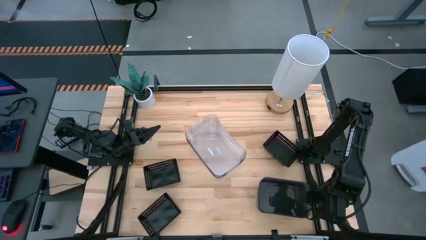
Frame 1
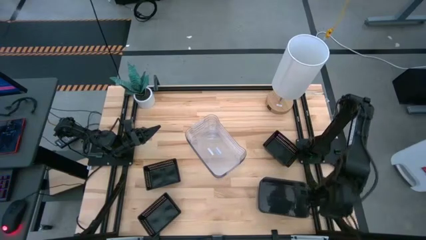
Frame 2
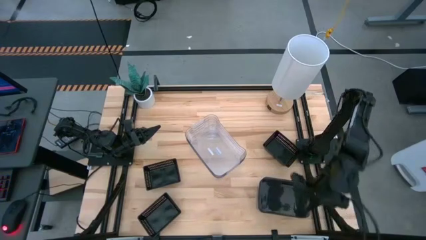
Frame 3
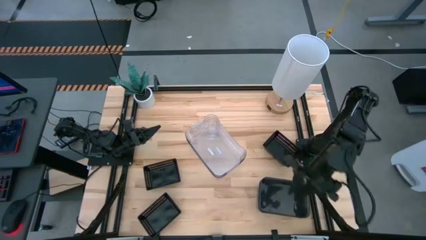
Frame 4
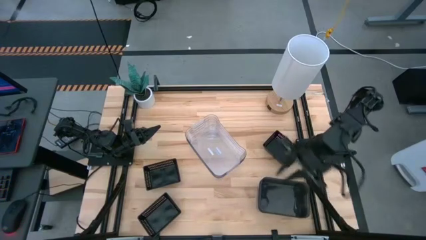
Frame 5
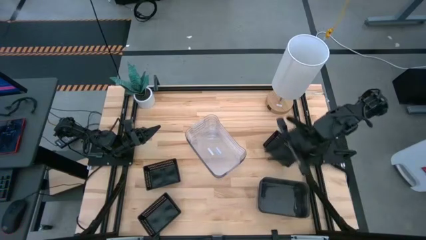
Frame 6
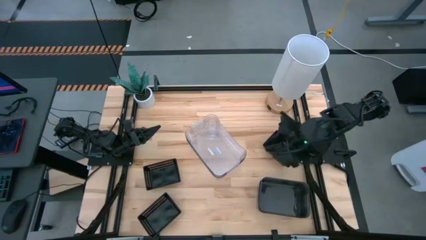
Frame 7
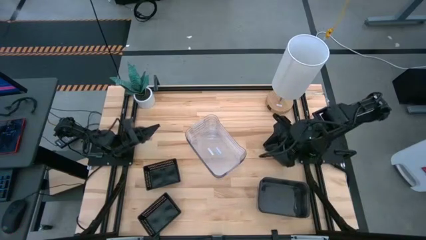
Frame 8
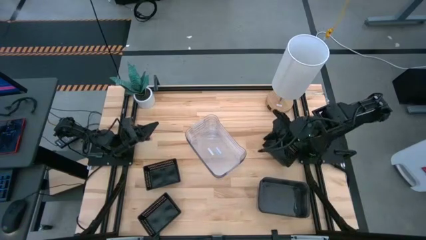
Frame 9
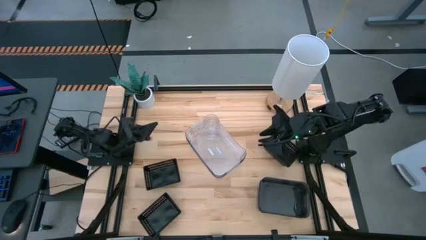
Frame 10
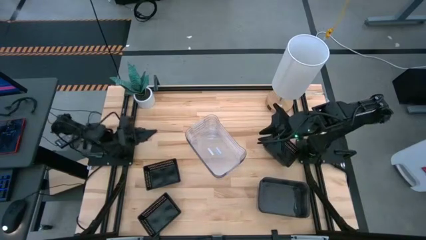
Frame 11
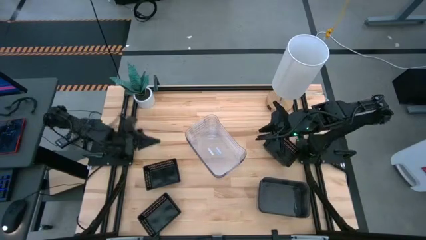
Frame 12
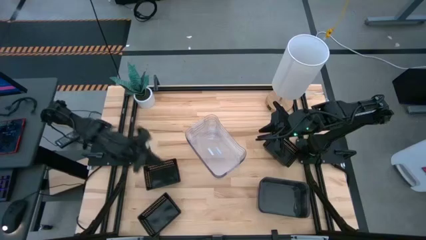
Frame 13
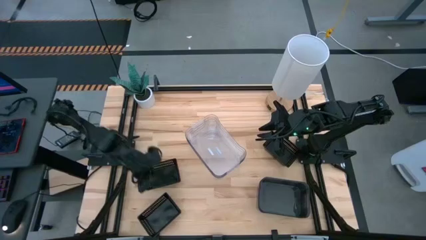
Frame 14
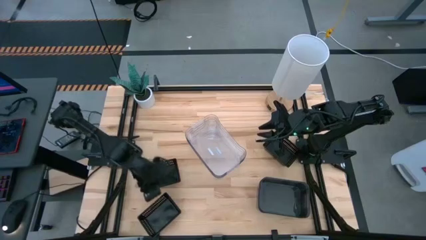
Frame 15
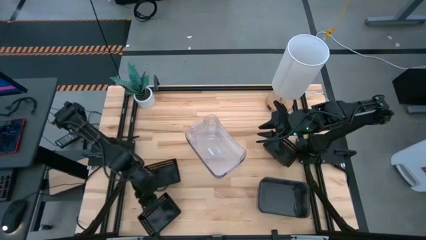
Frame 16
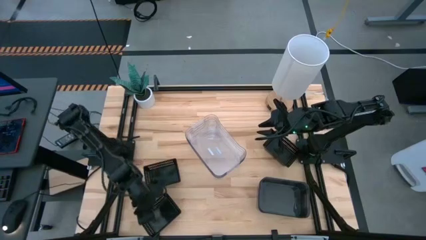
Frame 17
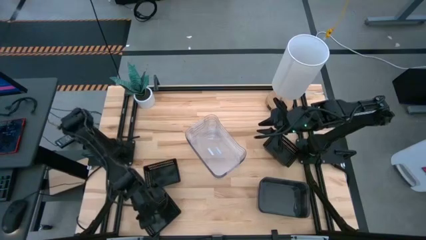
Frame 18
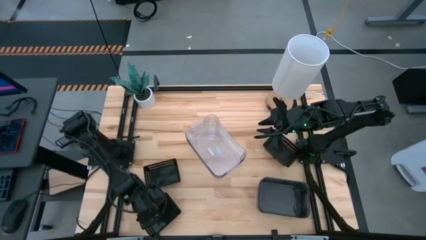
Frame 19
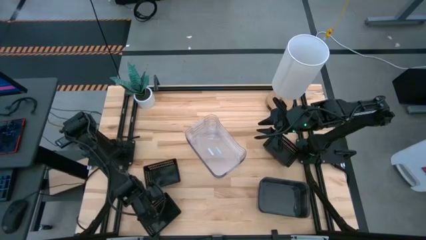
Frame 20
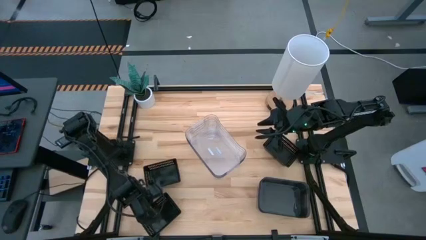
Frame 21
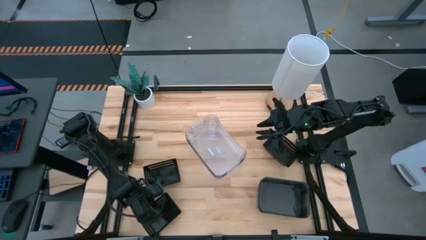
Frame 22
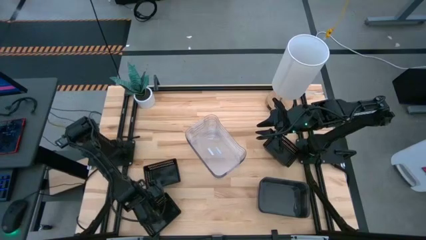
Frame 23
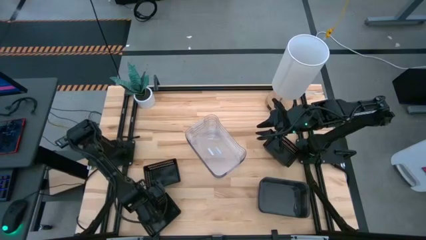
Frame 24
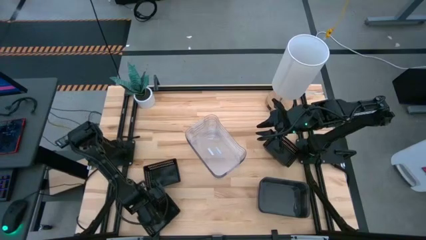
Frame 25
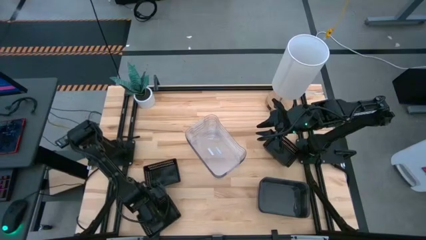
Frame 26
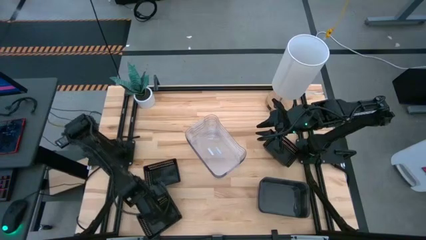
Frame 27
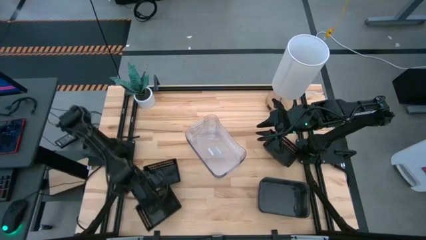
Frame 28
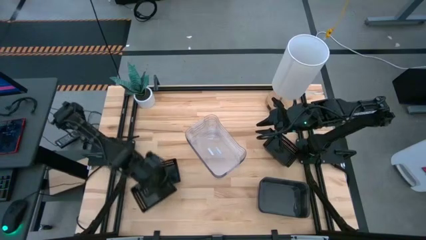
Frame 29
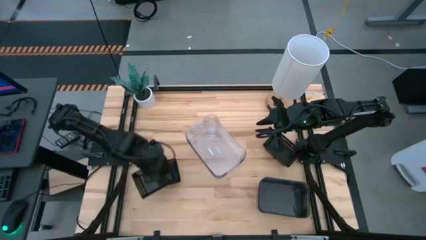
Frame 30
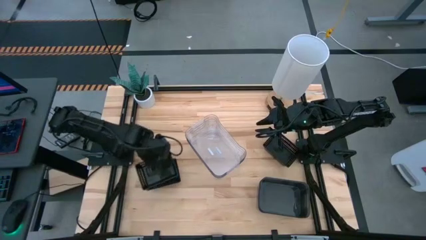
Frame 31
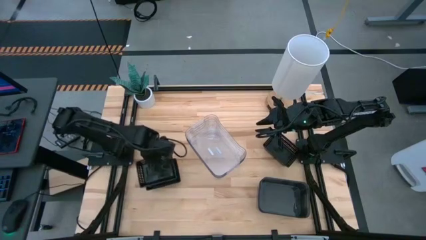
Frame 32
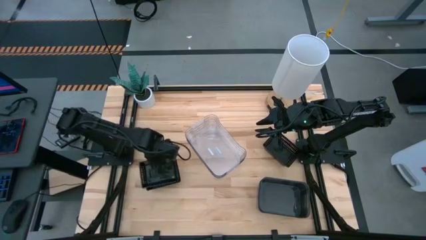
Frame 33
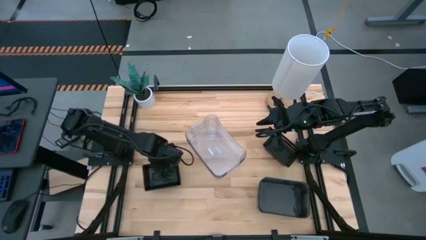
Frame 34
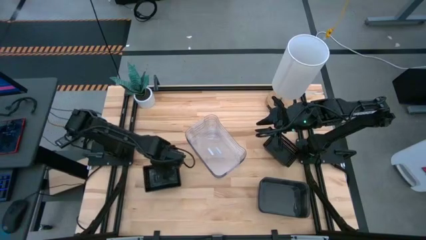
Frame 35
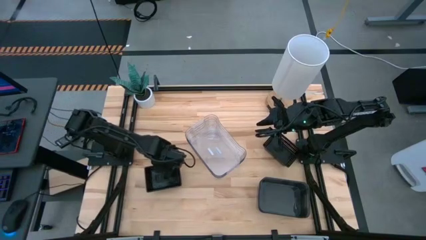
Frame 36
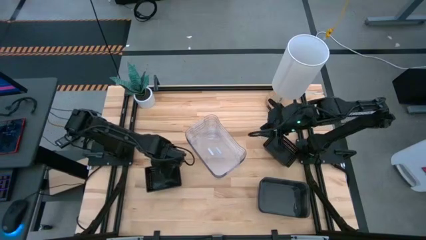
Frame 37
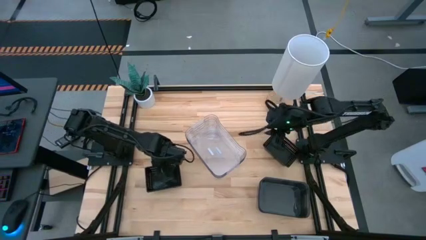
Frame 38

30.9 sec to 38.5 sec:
Stack the bottom black bin on top of the left black bin
